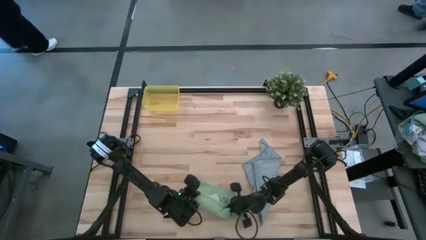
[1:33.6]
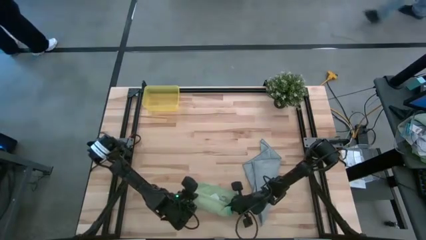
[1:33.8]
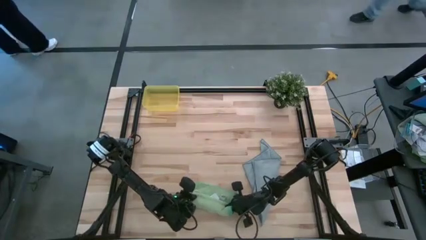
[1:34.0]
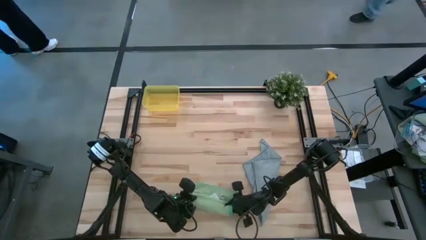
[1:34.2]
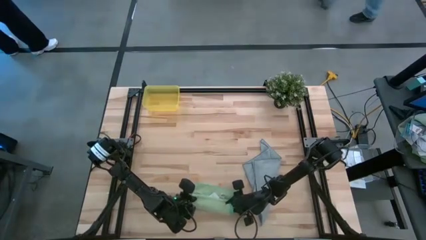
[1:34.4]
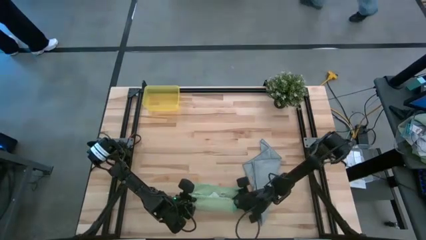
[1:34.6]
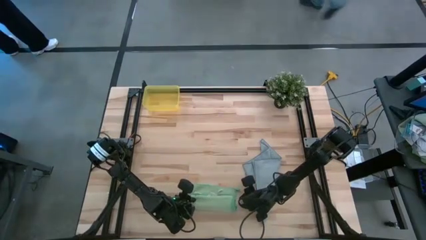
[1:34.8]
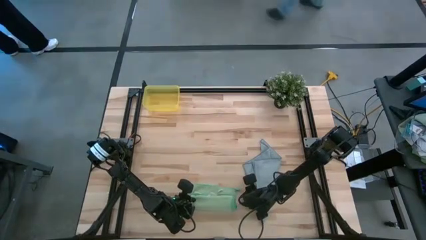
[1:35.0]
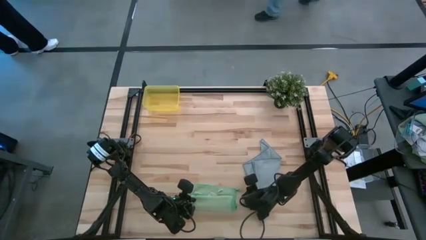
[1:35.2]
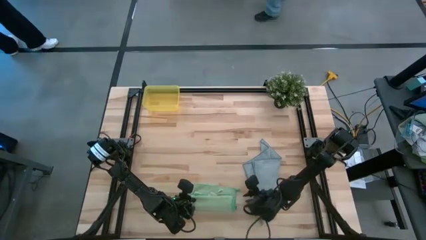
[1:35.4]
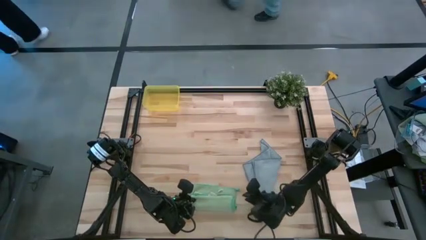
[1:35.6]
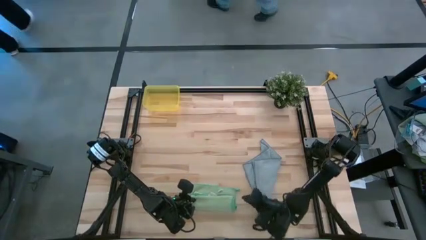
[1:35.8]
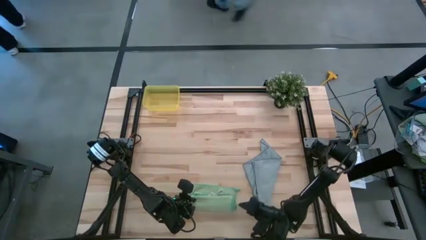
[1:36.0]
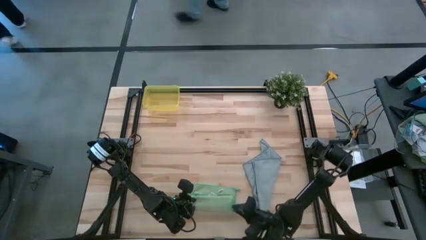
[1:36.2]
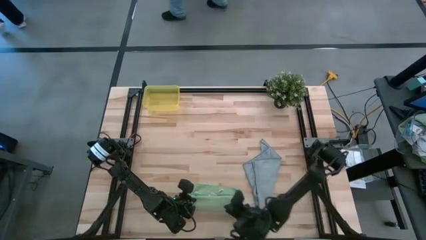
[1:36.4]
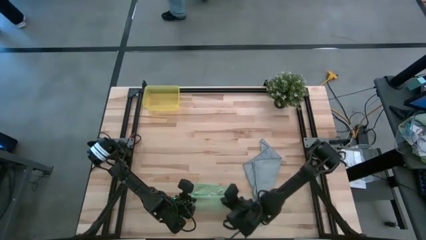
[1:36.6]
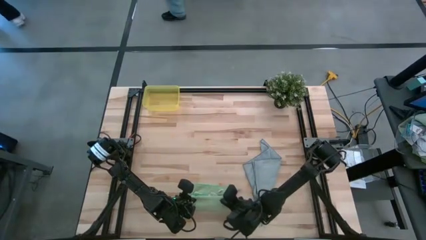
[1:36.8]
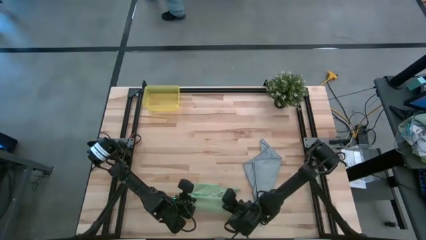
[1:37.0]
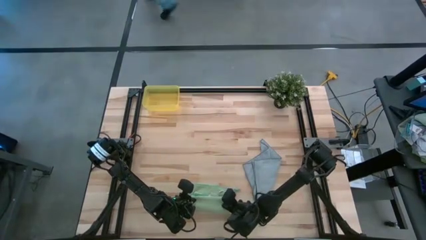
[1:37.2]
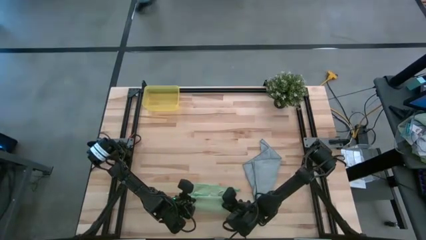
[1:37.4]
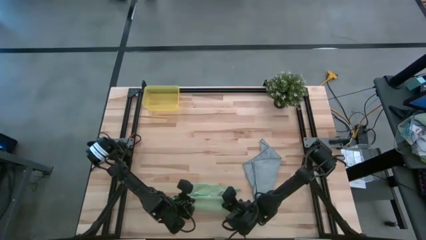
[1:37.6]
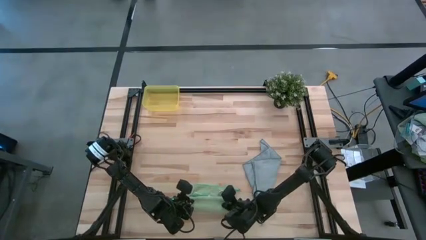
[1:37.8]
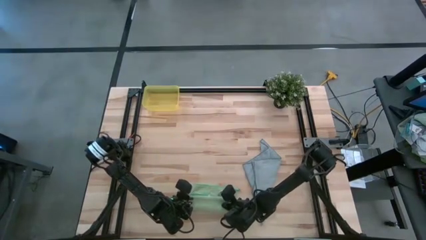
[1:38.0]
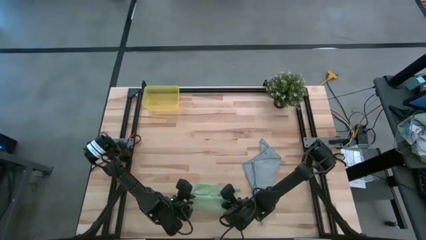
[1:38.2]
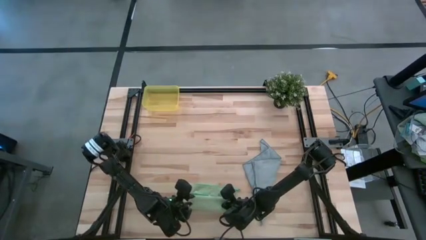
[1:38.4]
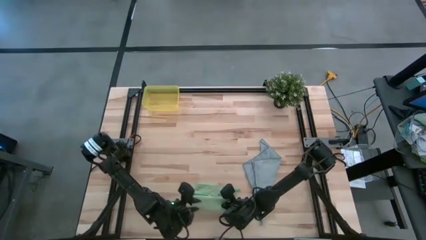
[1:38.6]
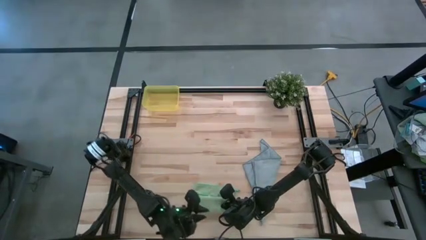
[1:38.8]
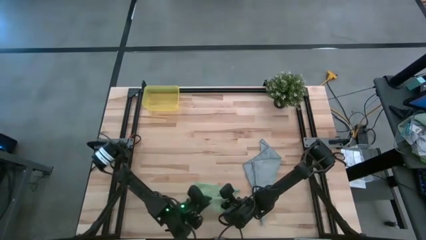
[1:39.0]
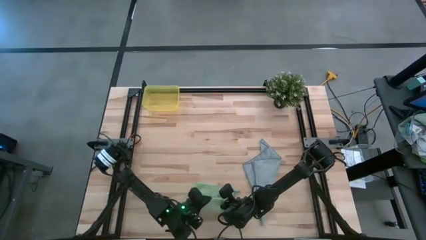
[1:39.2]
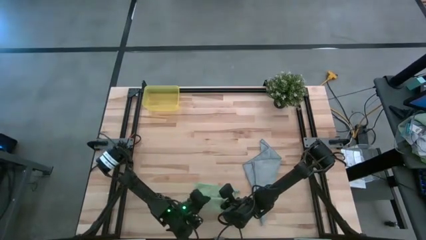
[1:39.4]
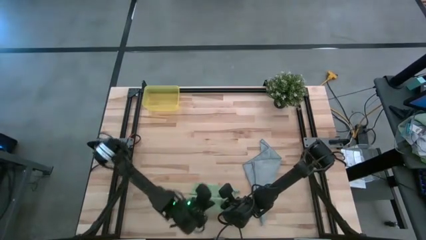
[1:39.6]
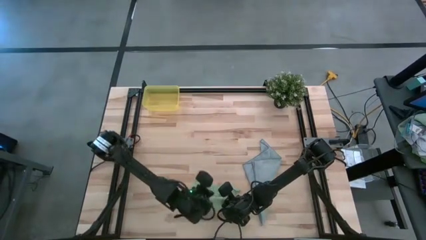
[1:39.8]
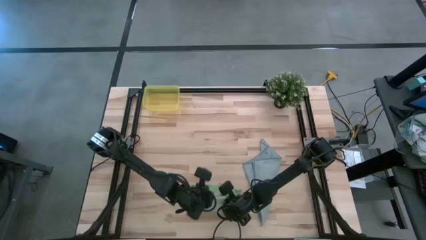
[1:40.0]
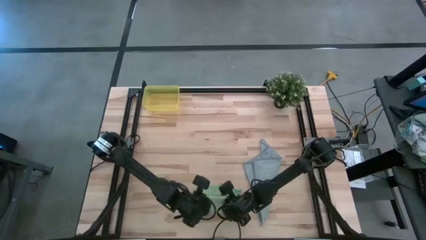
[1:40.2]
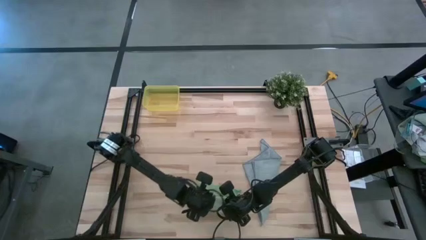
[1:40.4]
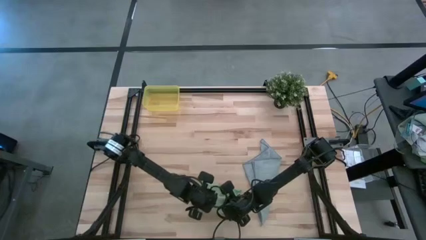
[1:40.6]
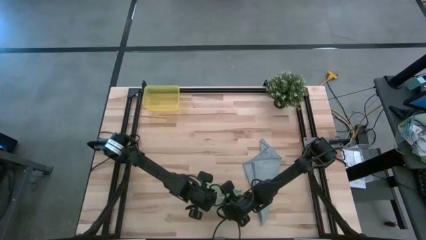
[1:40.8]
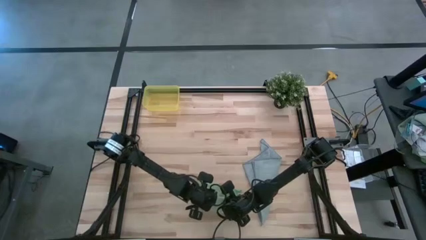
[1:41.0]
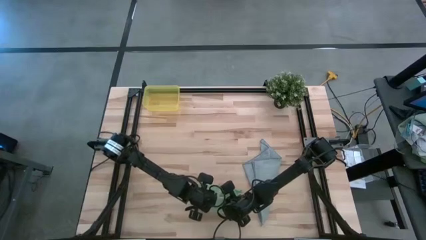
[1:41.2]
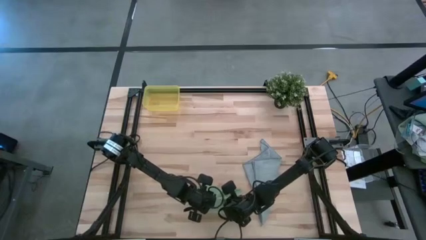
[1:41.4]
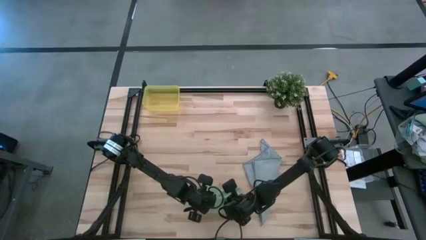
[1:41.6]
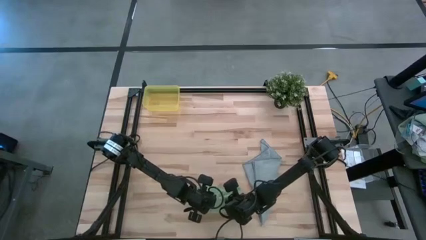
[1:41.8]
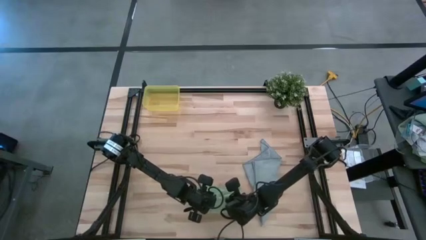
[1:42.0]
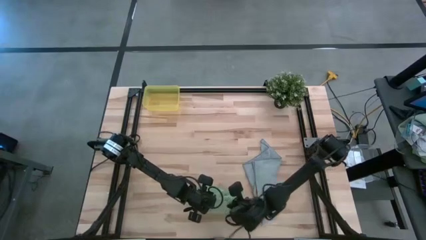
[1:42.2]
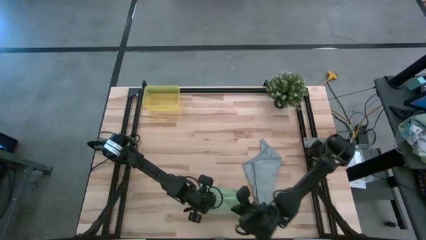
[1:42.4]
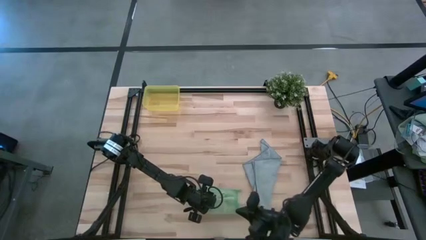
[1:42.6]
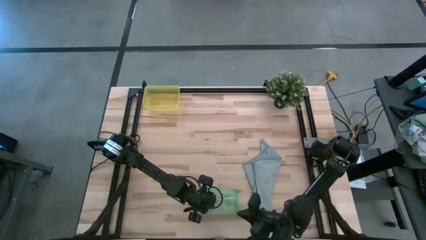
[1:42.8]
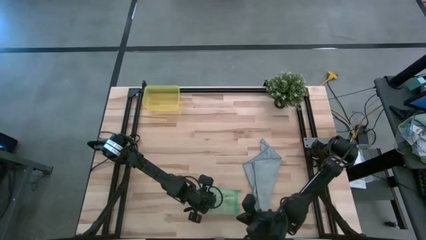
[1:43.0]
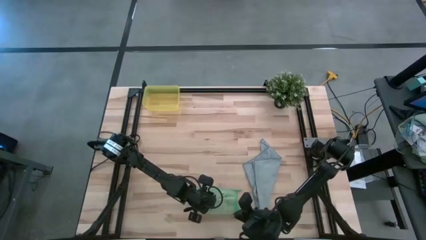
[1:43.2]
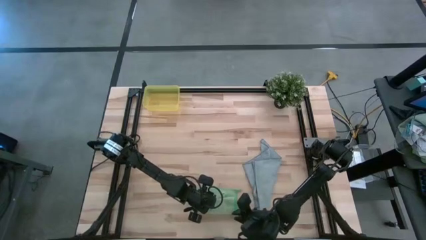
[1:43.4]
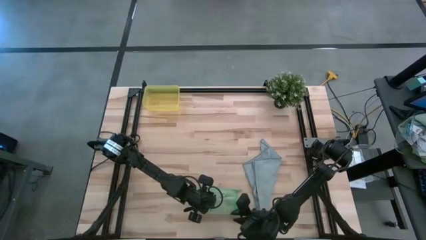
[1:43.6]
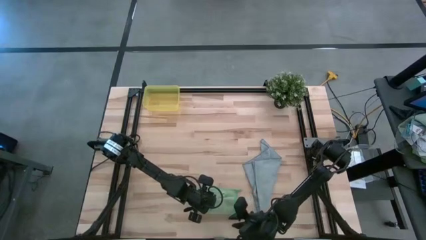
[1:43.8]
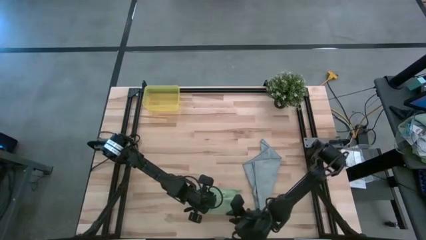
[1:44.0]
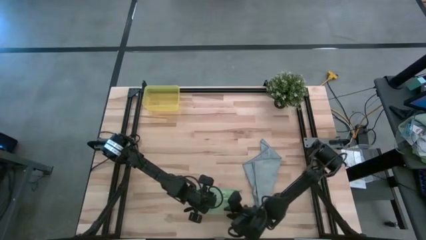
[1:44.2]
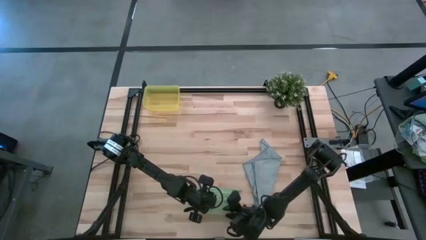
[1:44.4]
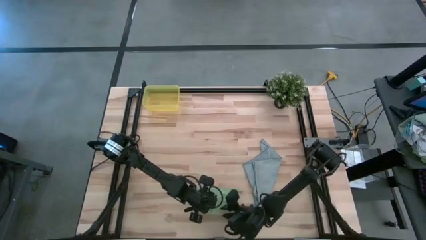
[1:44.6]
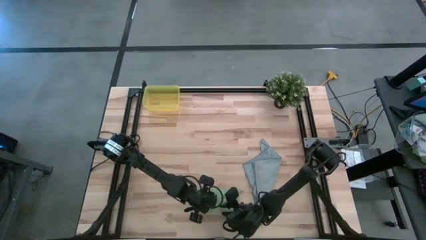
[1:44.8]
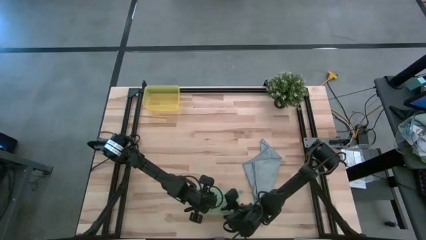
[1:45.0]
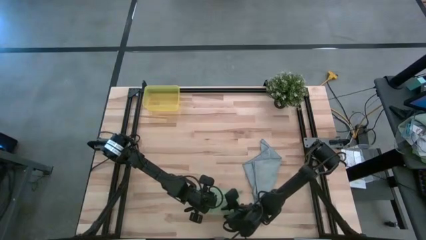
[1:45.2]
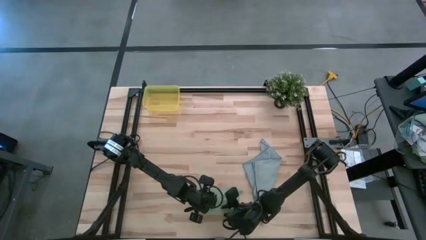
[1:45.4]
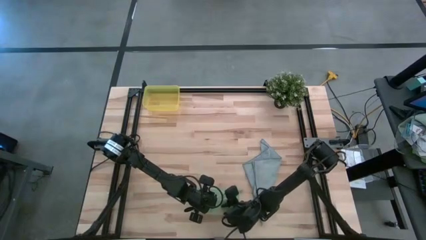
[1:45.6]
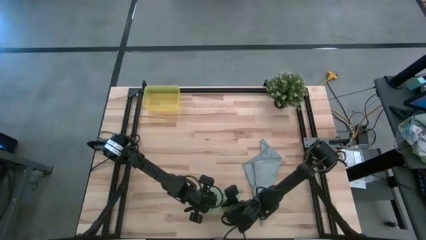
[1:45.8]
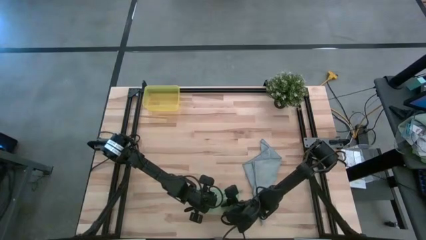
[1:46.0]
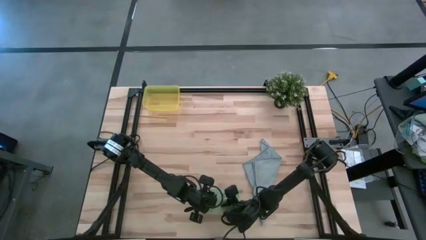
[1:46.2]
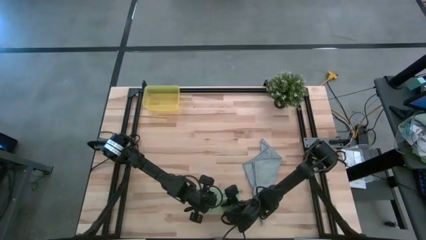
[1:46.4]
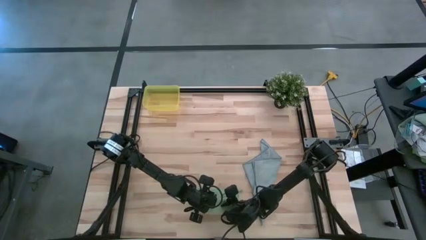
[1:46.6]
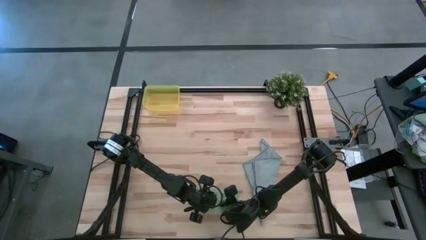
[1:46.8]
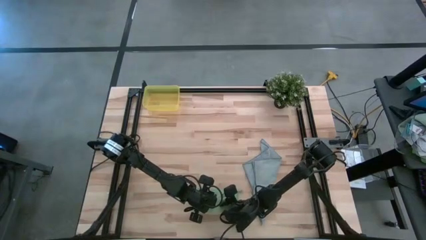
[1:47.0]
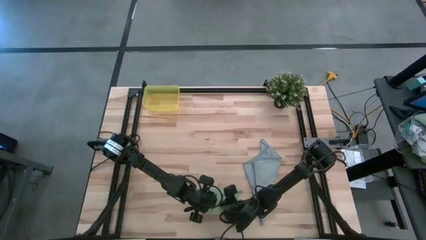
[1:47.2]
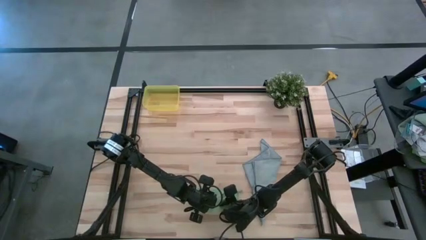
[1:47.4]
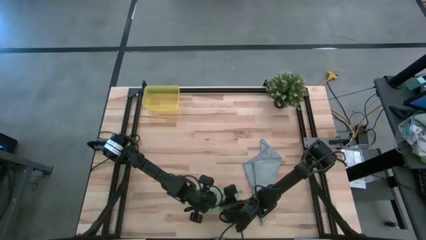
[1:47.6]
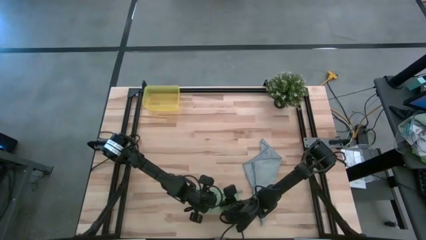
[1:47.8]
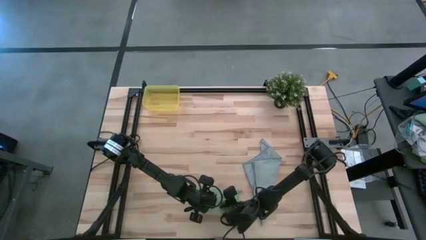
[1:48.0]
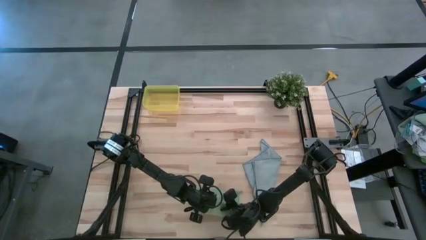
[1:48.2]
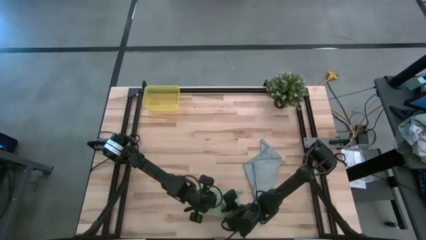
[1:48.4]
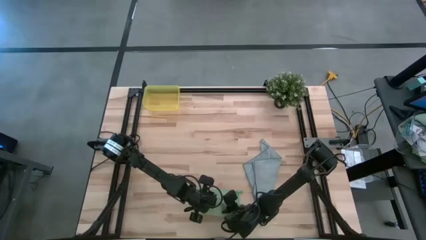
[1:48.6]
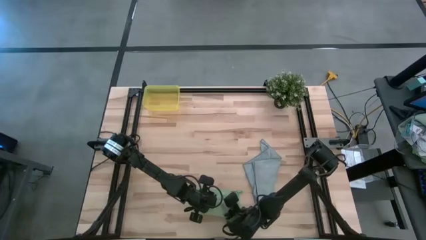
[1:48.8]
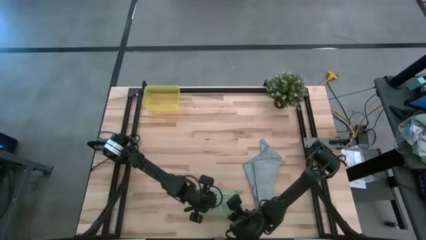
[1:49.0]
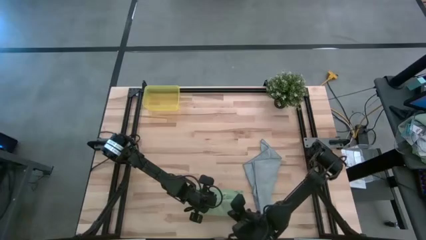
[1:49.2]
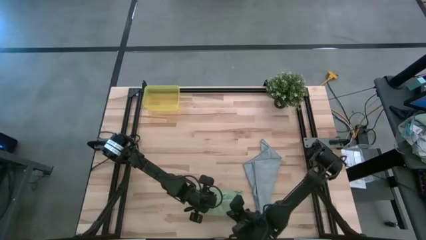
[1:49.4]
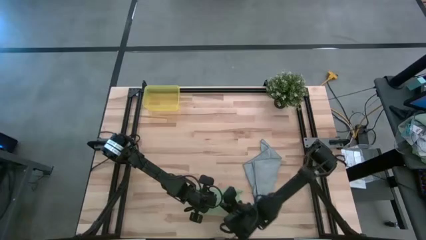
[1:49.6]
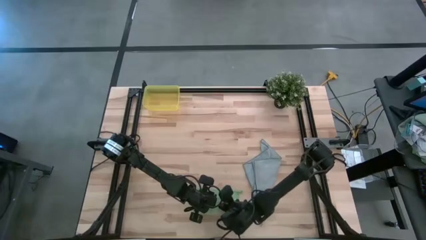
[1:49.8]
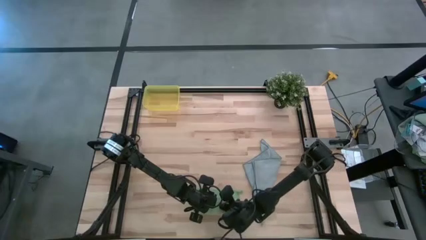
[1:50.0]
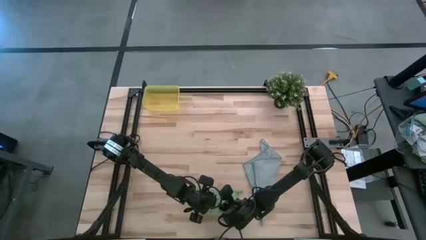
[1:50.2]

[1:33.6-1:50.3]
Task: Roll microfiber towels into tight, uniform cylinder then place into a basket
Roll the green towel
